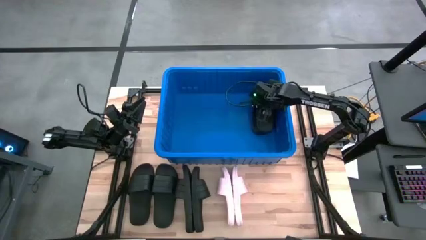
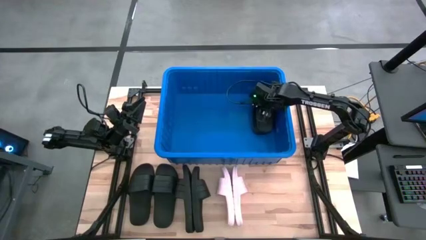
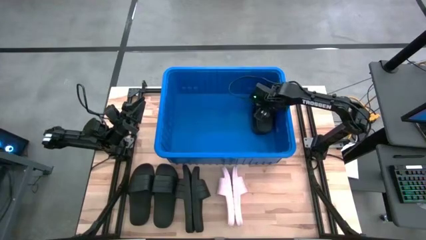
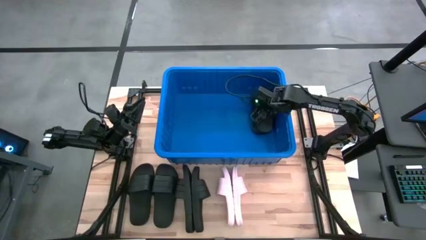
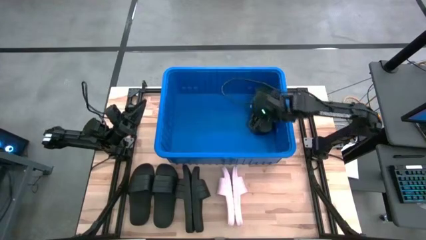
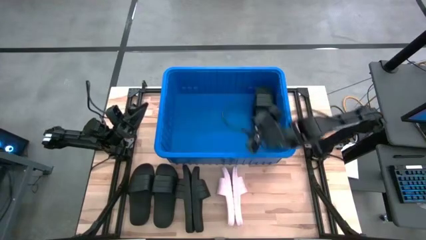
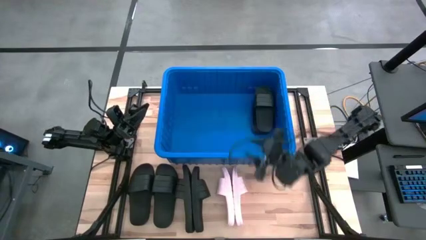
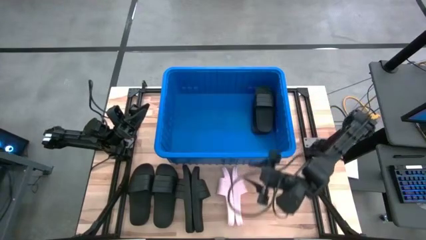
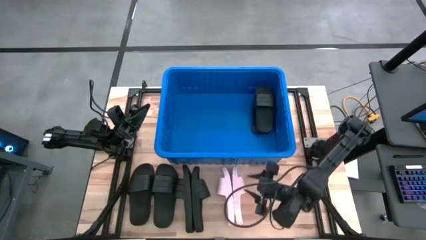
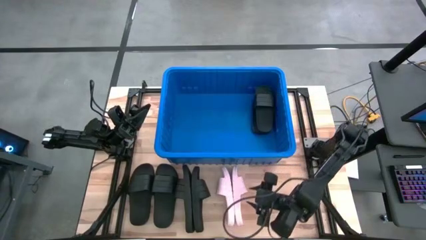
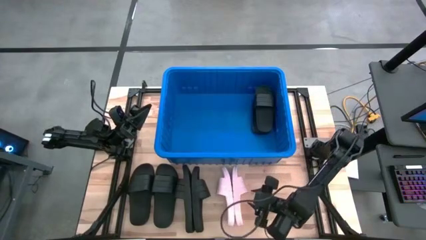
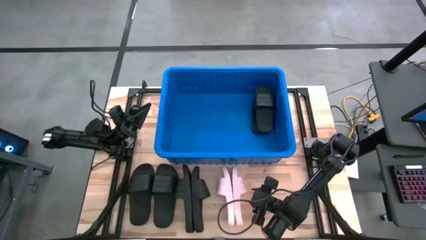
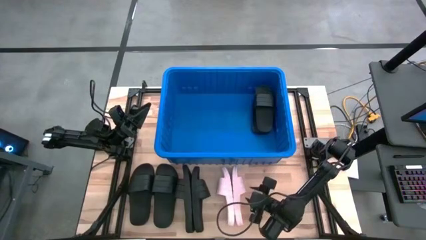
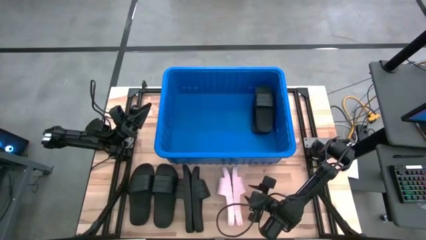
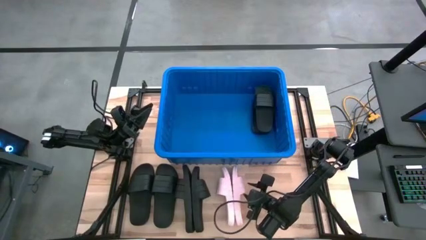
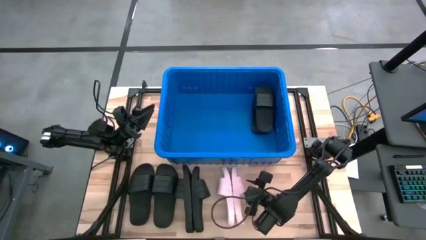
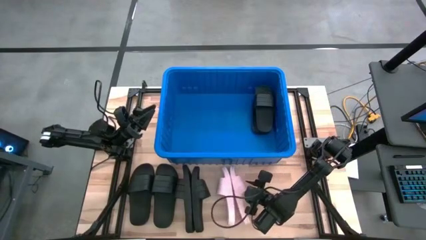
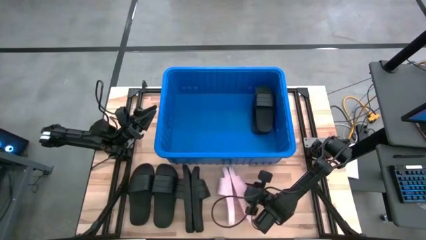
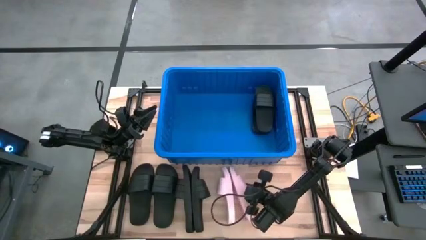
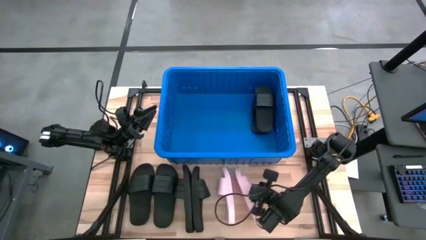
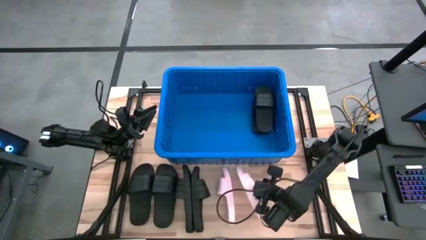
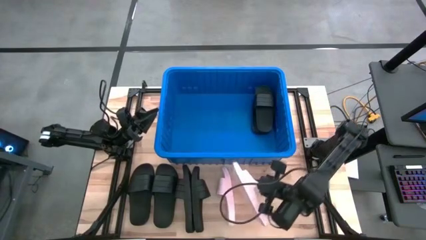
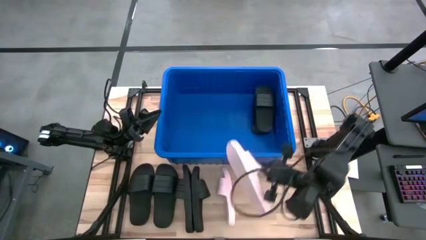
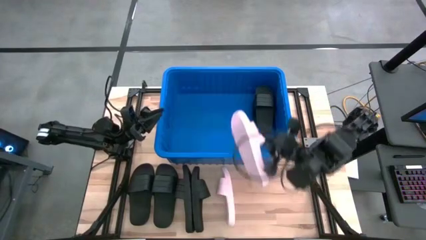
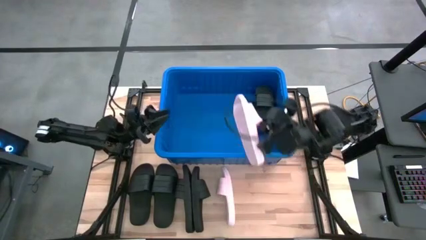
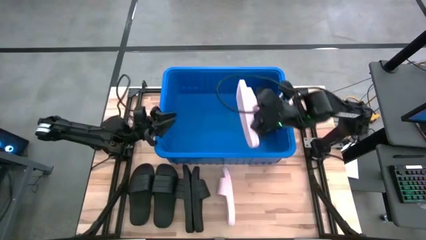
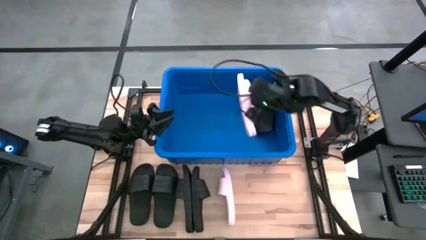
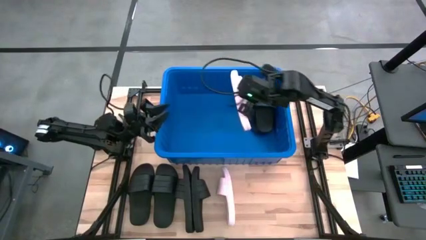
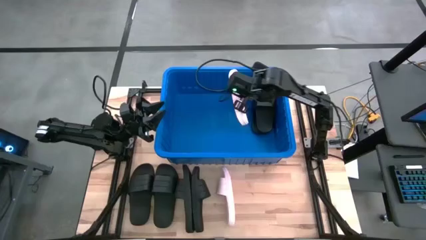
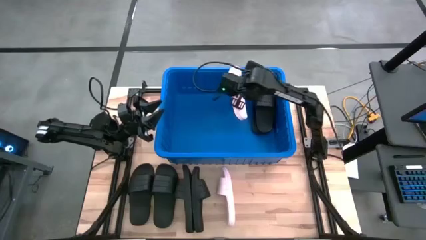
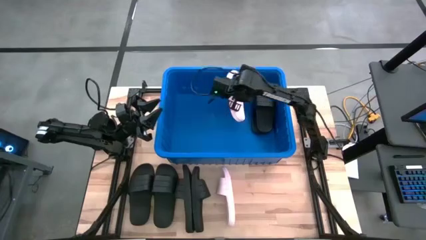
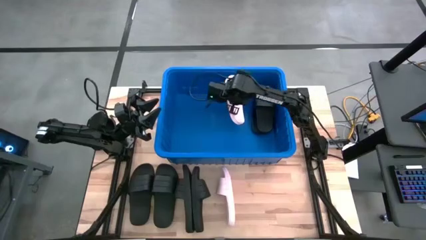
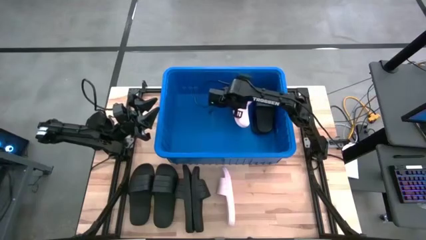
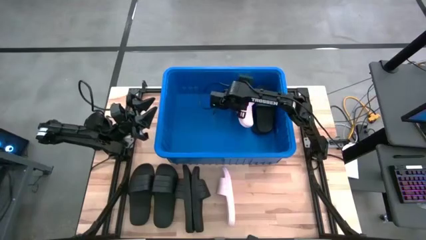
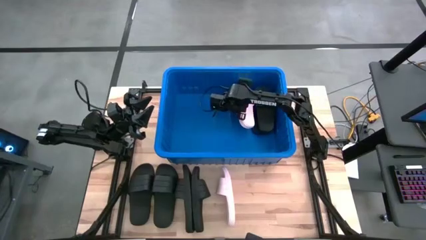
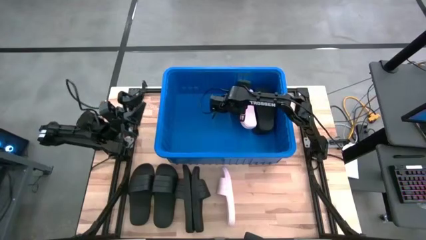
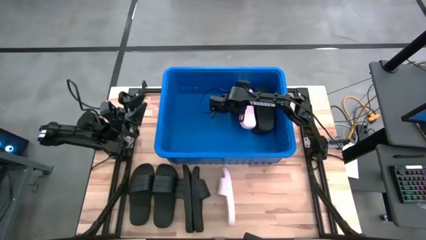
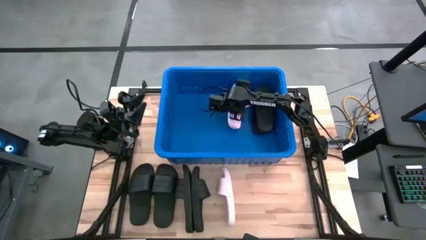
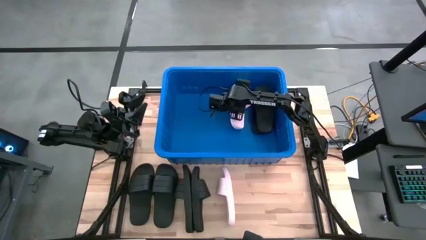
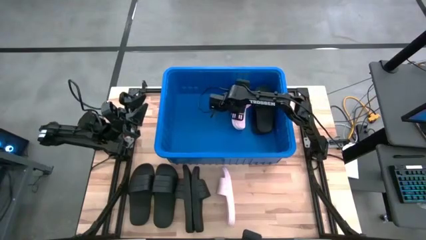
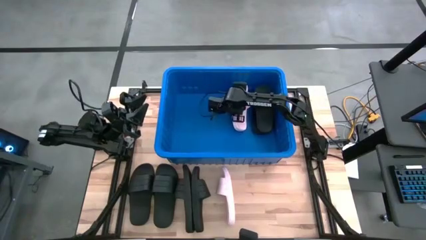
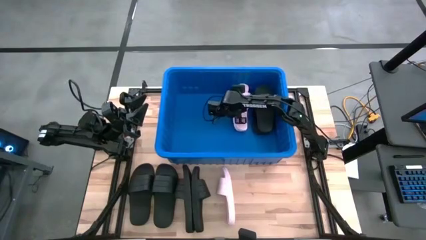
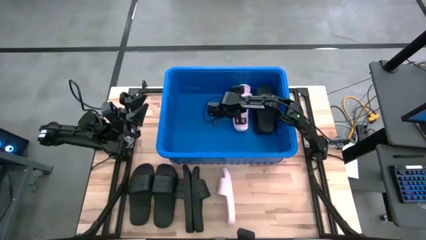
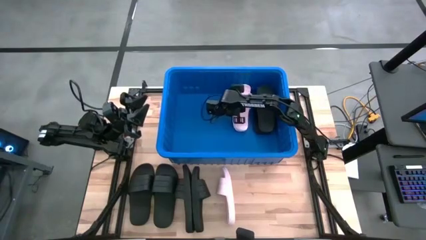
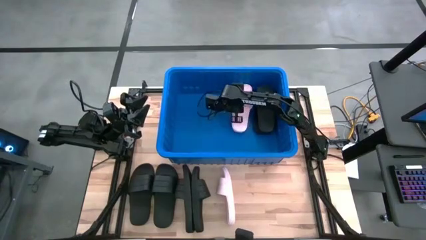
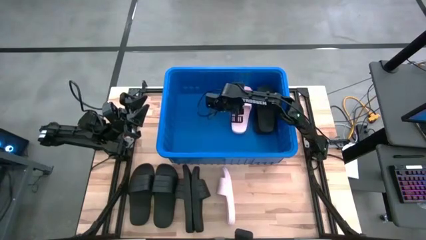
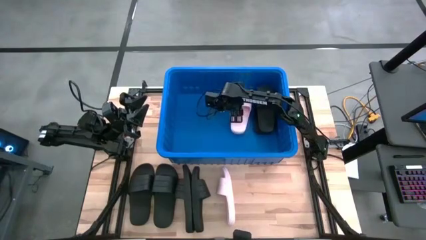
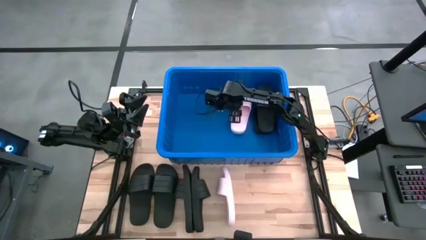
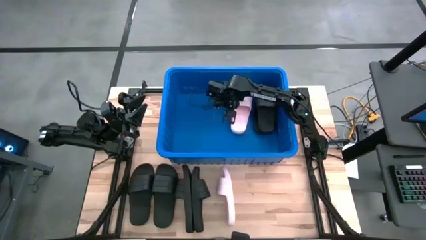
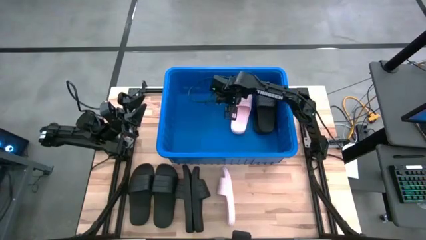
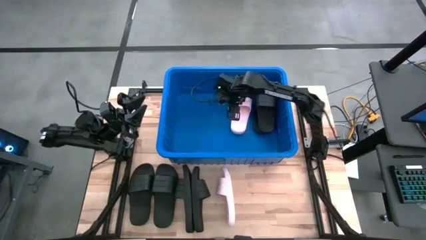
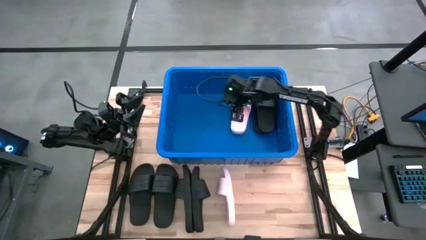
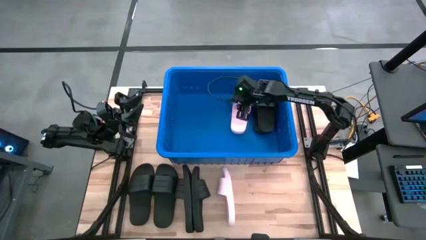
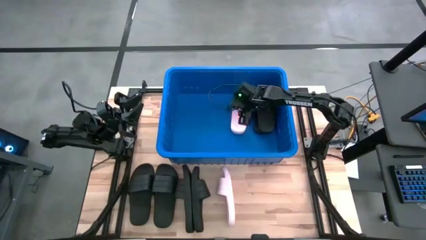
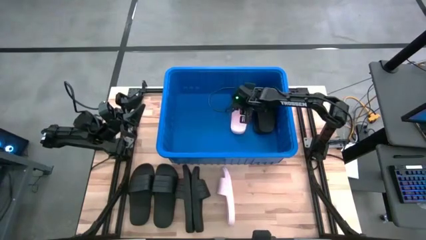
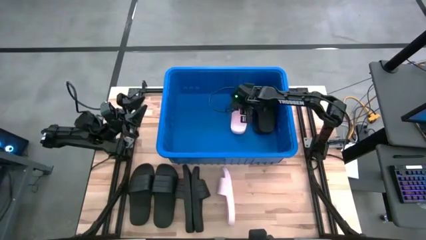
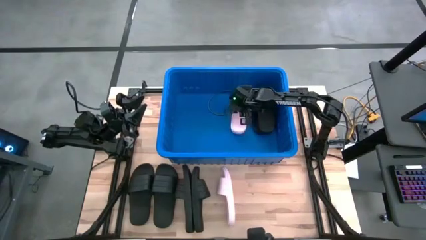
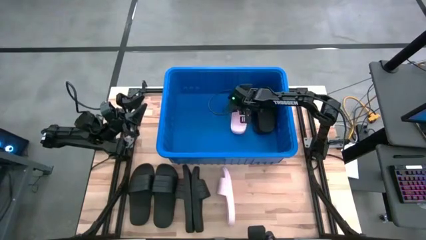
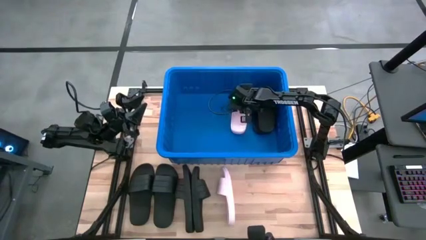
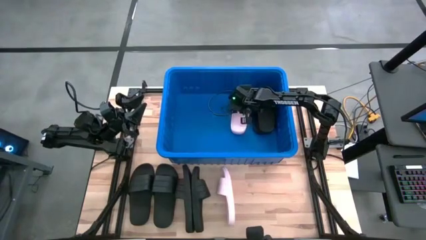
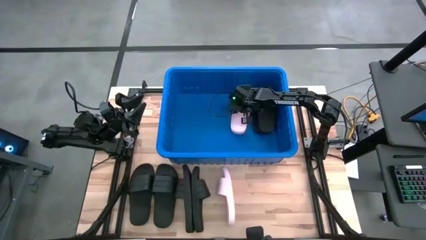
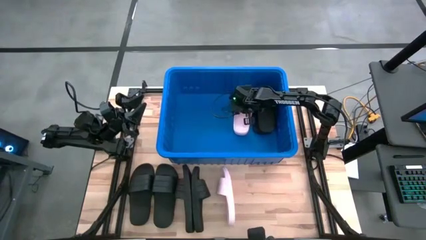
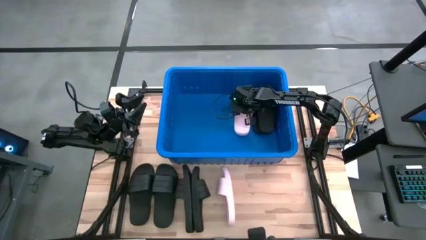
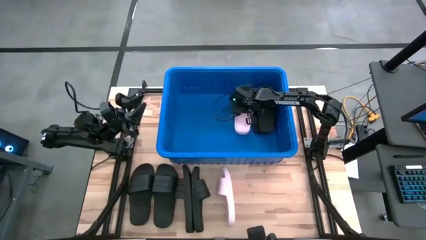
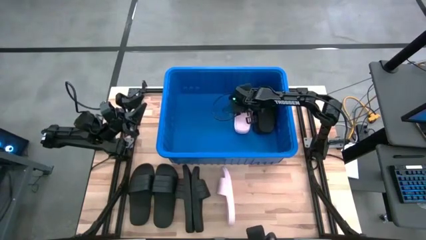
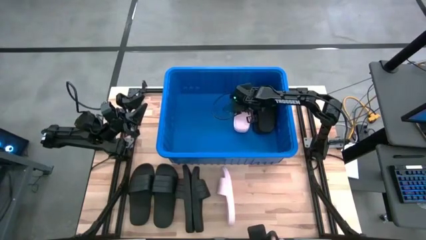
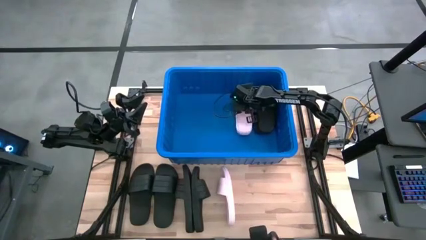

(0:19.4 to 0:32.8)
Task: Pick and place slides into bin
Put the pink slide into the blue bin

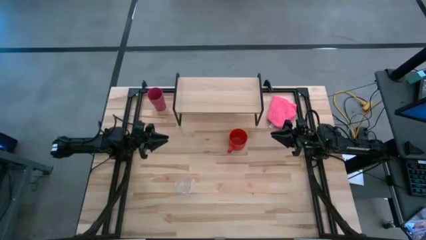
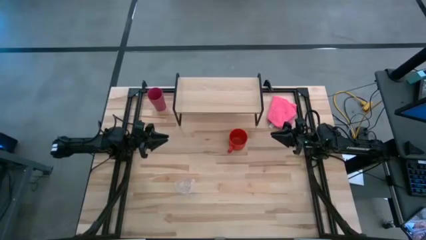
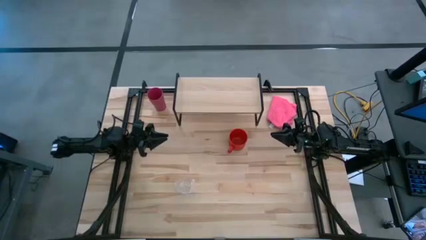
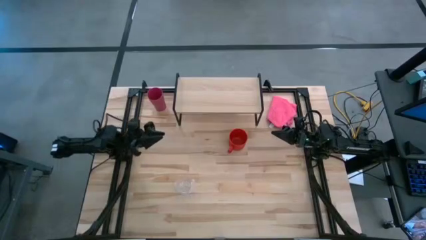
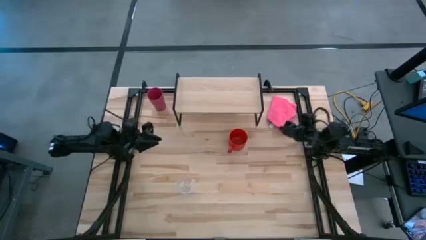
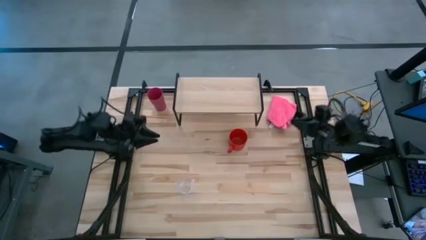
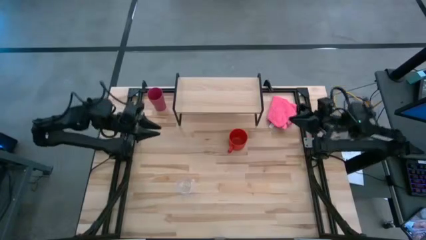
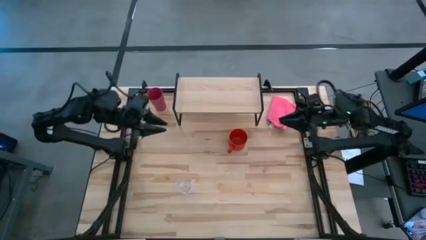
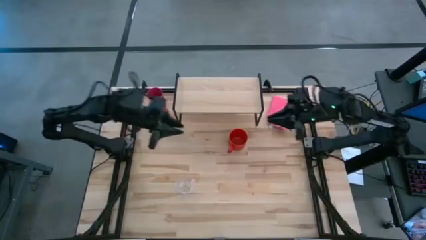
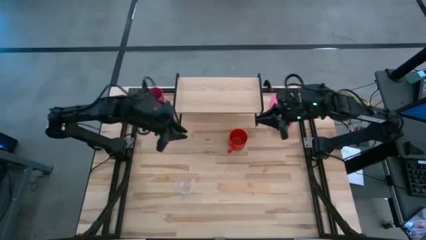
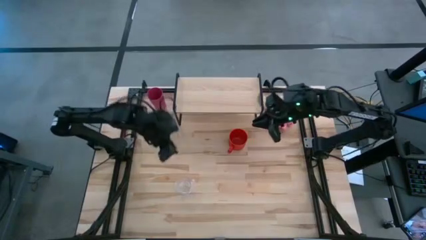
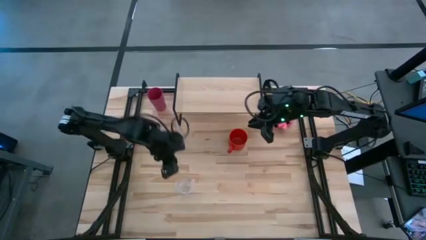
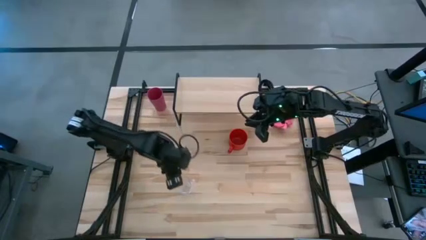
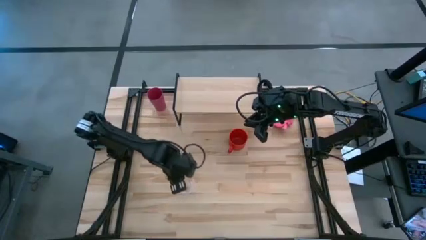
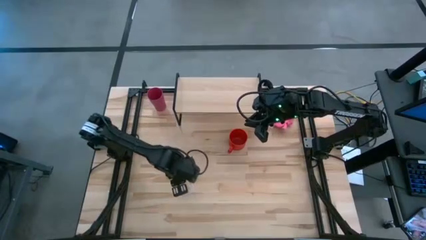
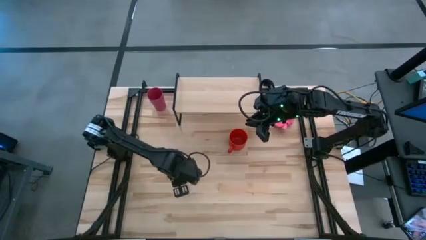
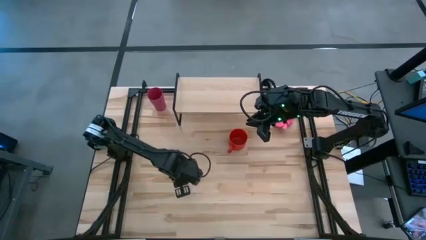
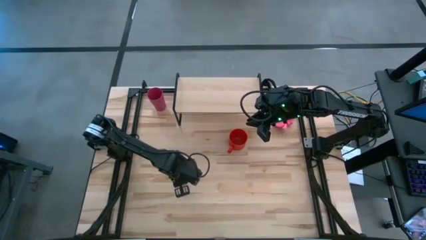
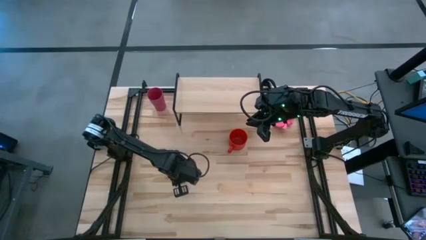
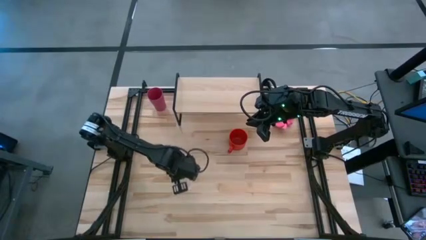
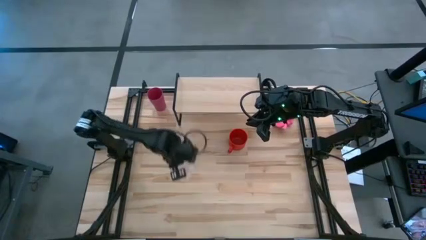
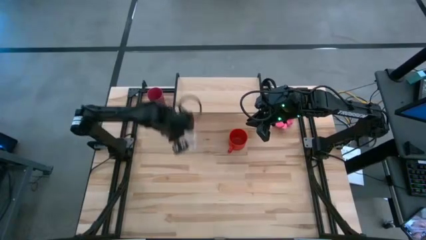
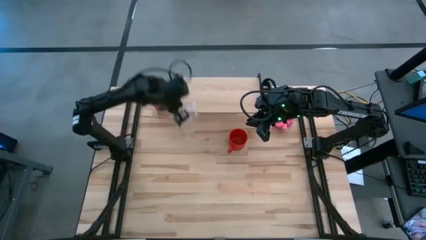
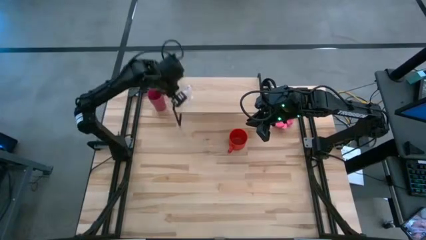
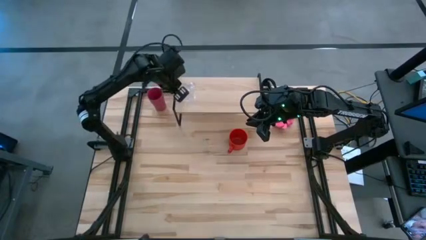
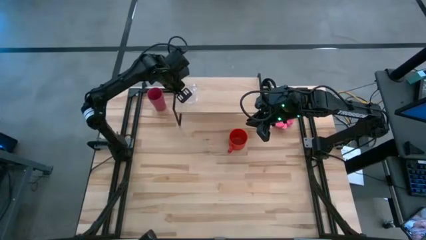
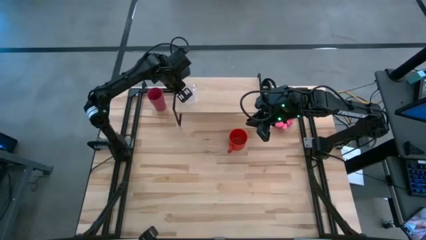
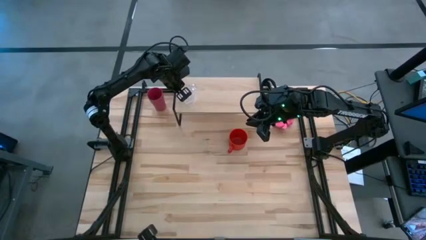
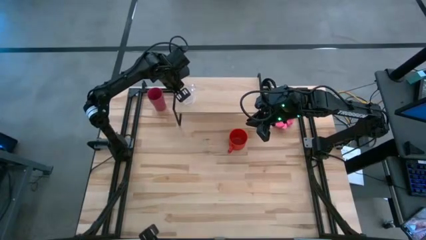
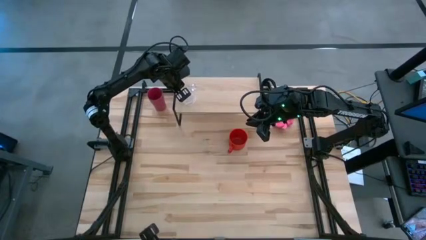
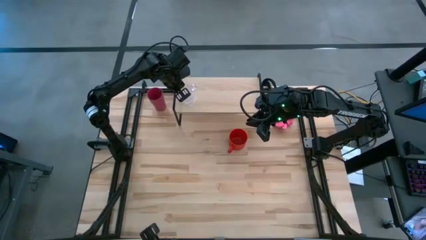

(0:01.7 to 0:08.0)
Task: Stack small to large cups/mugs on shelf
Put the transparent mug on the shelf
